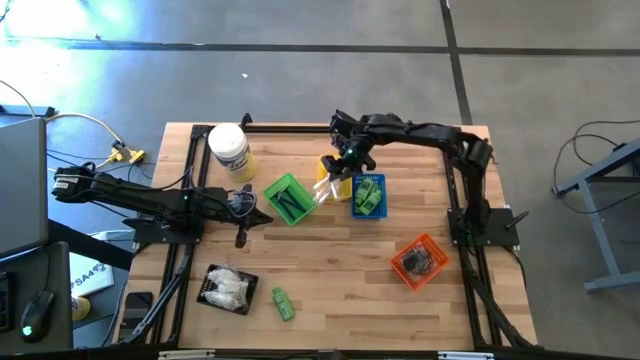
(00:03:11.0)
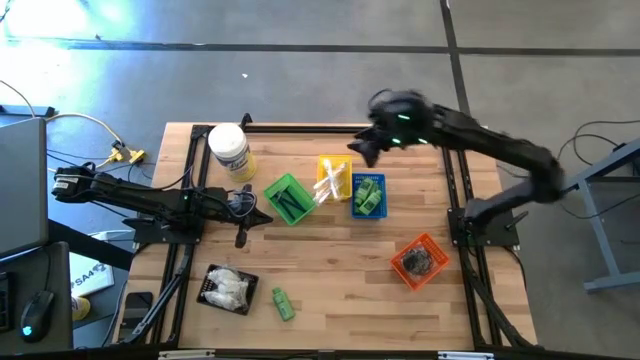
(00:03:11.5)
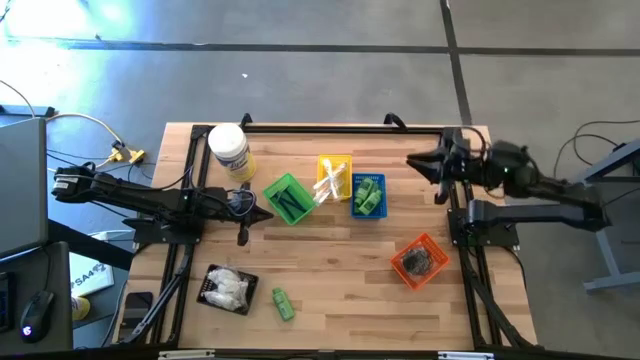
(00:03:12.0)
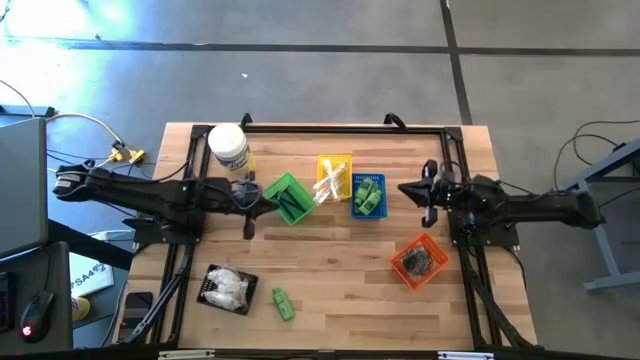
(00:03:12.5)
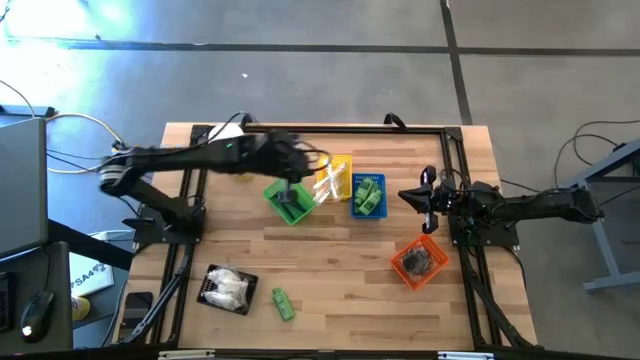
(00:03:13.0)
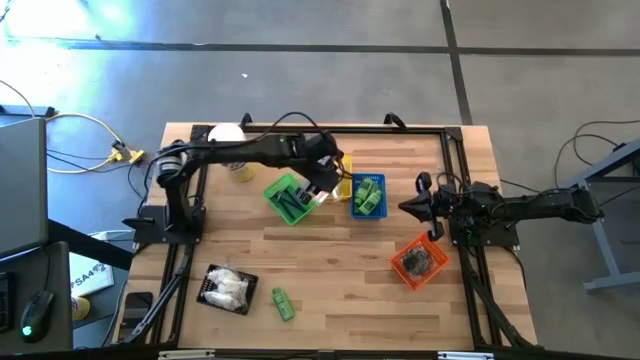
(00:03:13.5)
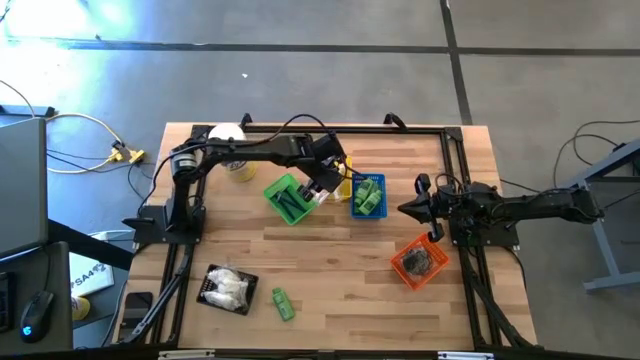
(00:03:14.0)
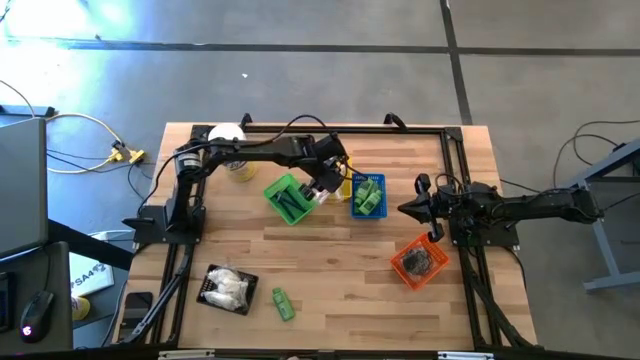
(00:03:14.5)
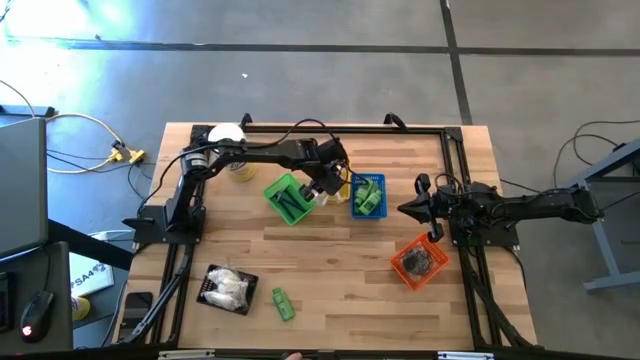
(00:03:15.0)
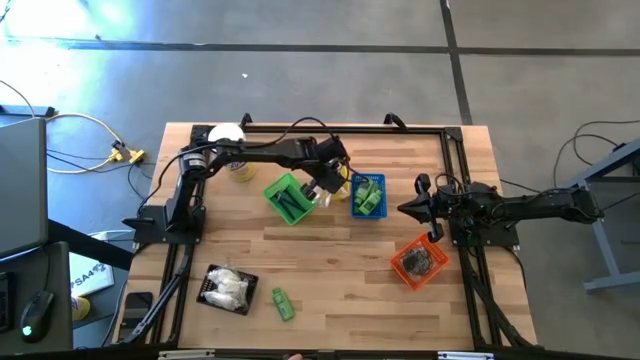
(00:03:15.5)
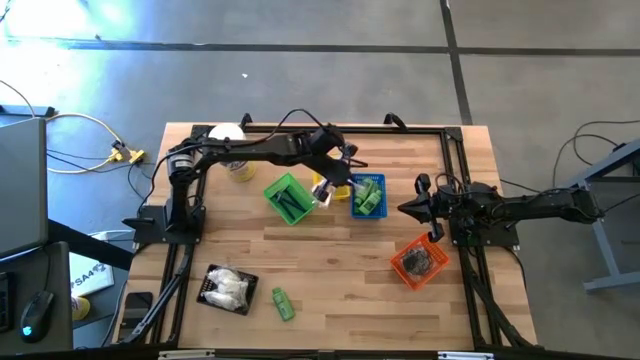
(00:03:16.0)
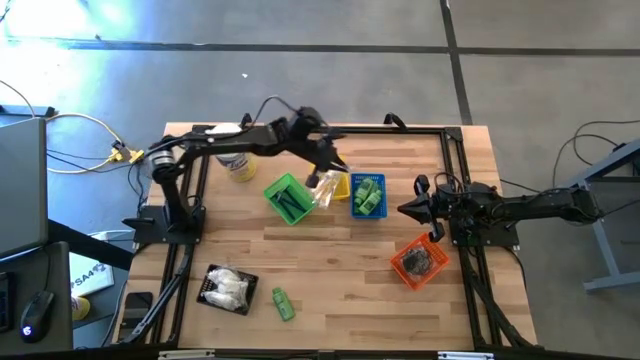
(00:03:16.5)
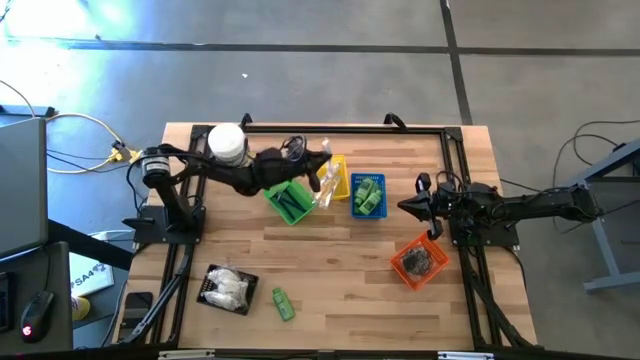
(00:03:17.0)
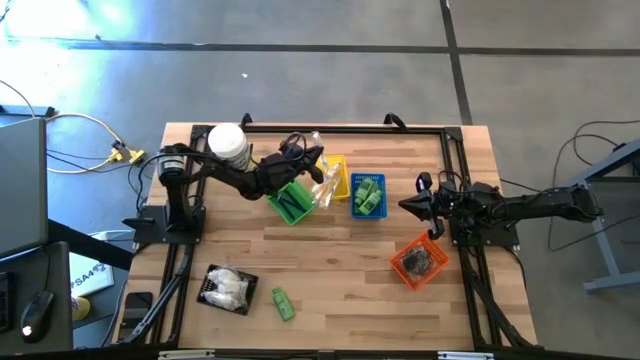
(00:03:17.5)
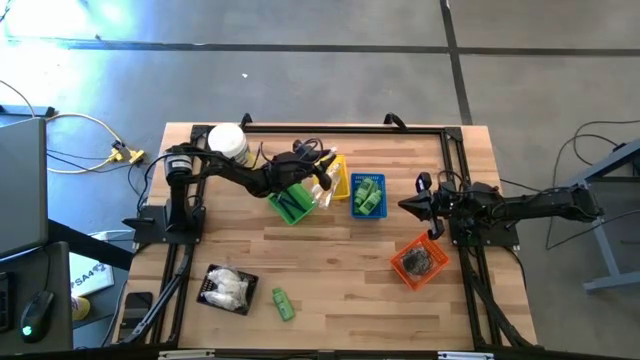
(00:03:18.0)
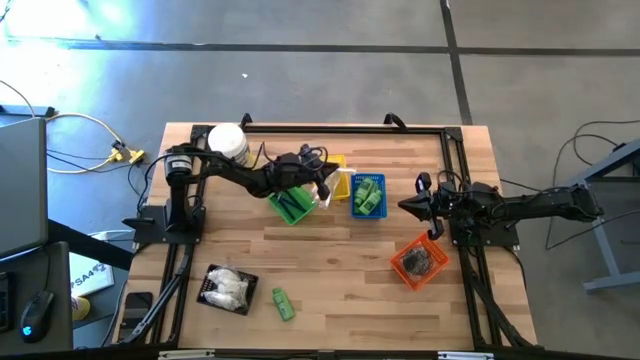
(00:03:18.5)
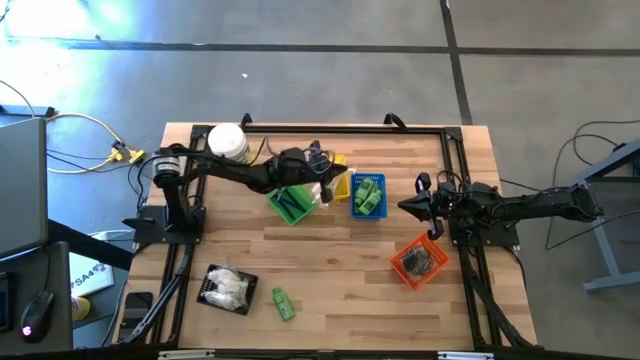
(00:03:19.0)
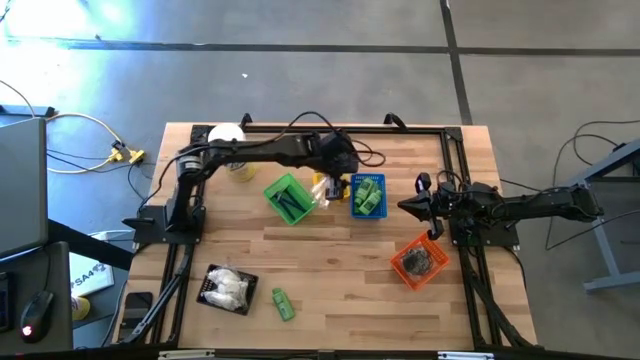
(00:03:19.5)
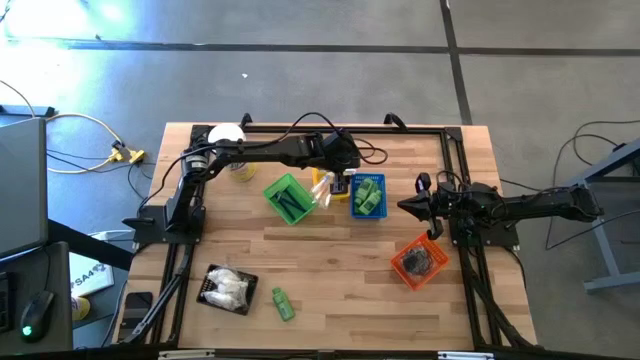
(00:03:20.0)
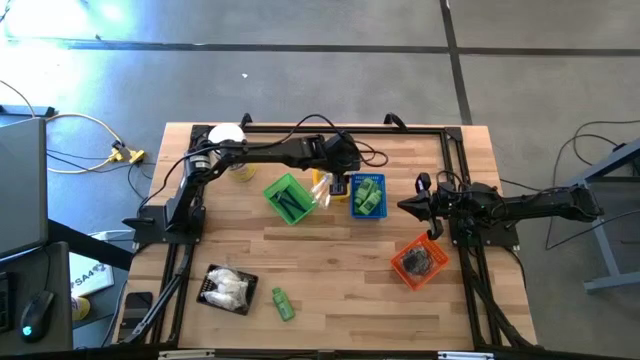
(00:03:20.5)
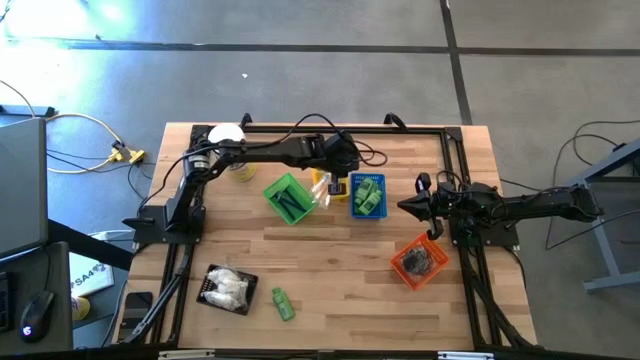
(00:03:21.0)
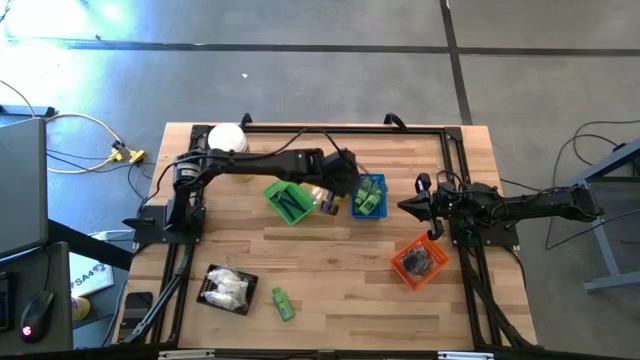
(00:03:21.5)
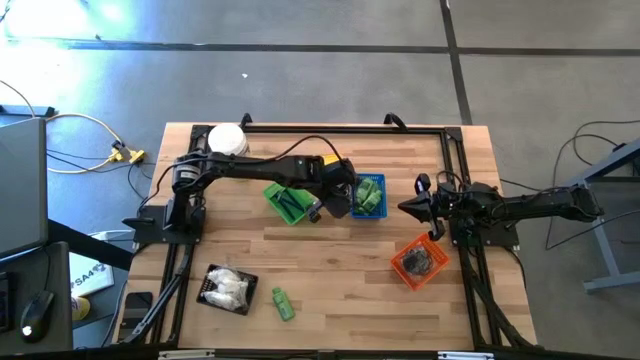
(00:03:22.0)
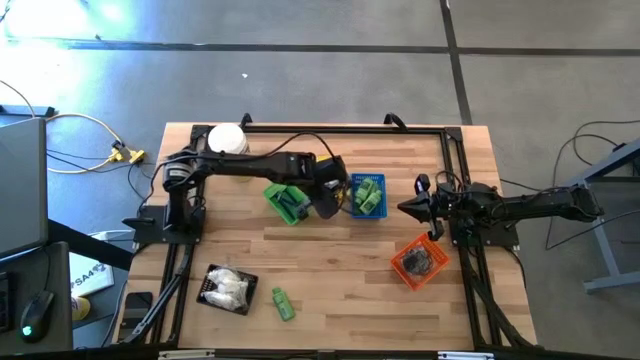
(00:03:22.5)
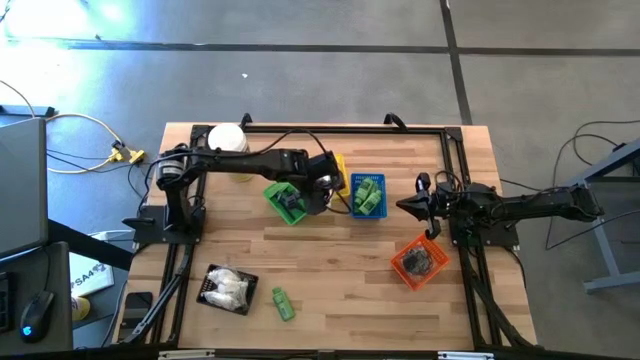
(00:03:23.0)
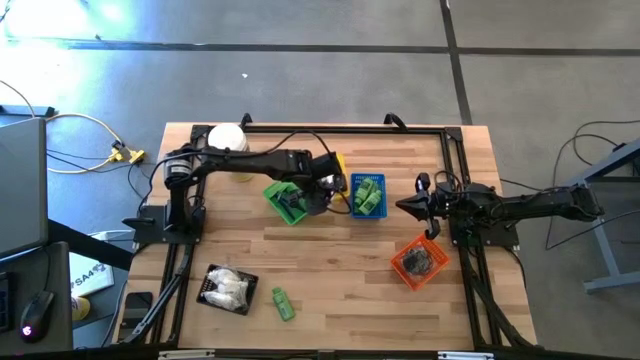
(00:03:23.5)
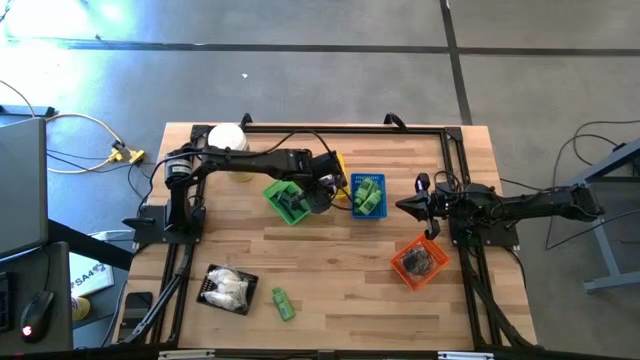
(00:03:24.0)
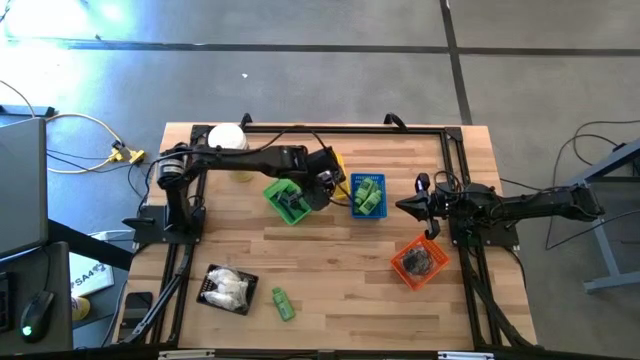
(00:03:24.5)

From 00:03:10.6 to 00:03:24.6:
Task: Pick & Place Travel size toiletries
Put the blue toothbrush into the yellow basket

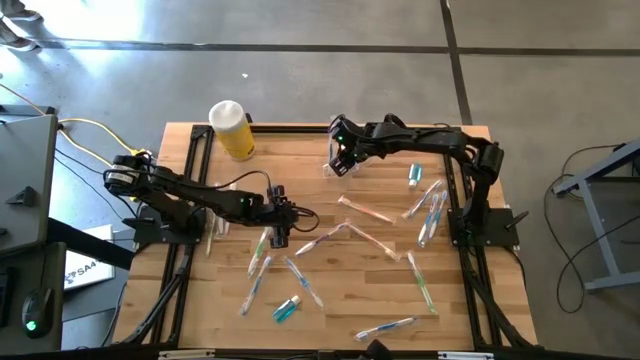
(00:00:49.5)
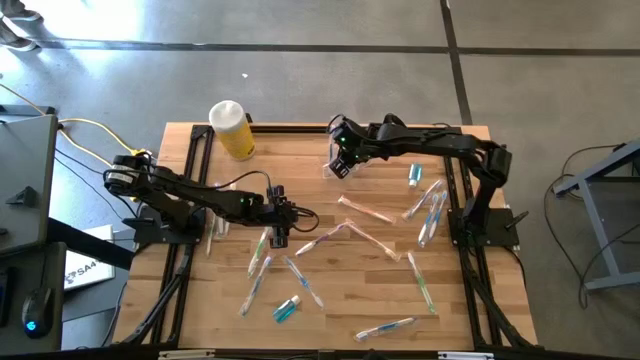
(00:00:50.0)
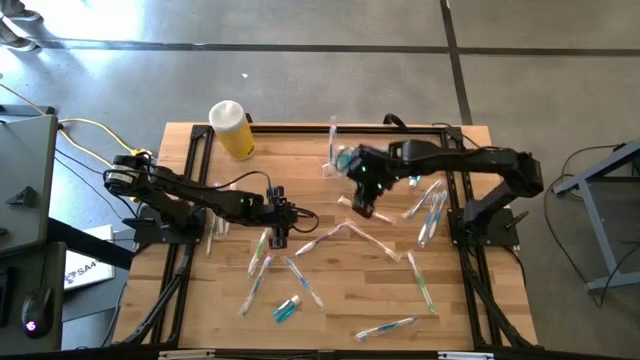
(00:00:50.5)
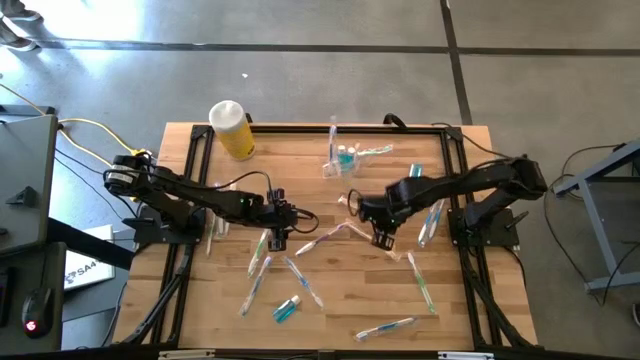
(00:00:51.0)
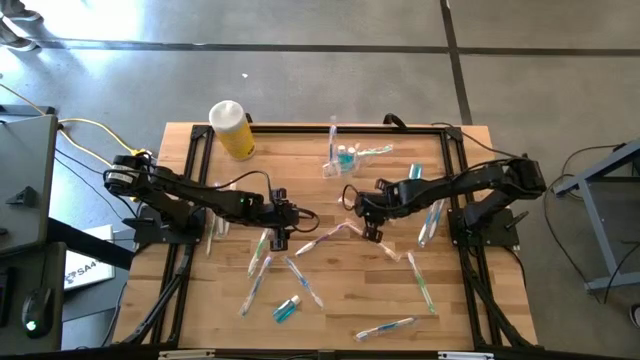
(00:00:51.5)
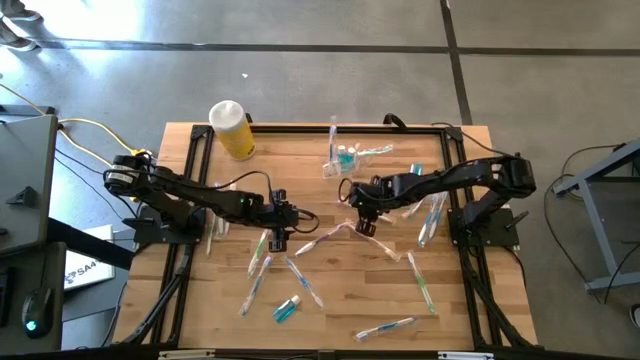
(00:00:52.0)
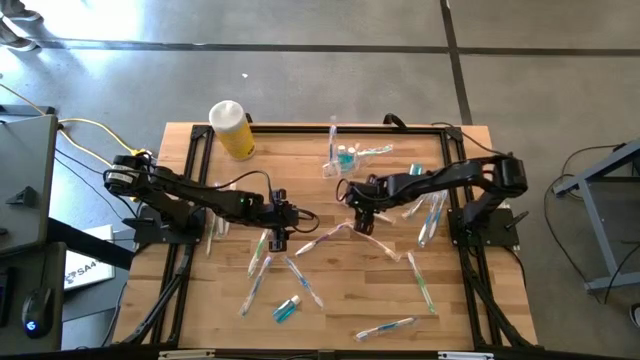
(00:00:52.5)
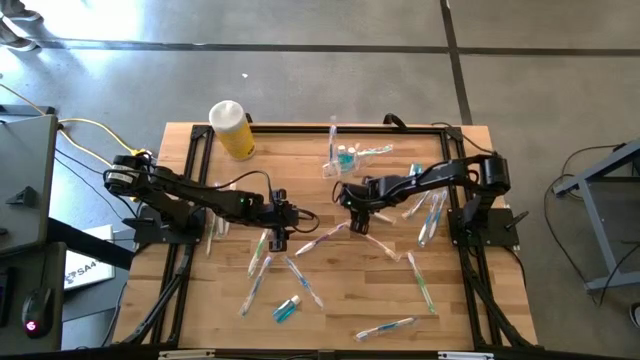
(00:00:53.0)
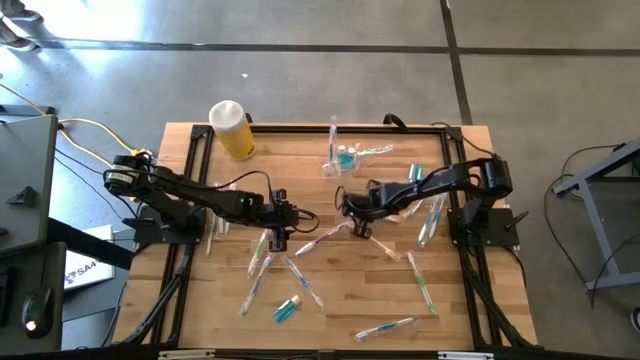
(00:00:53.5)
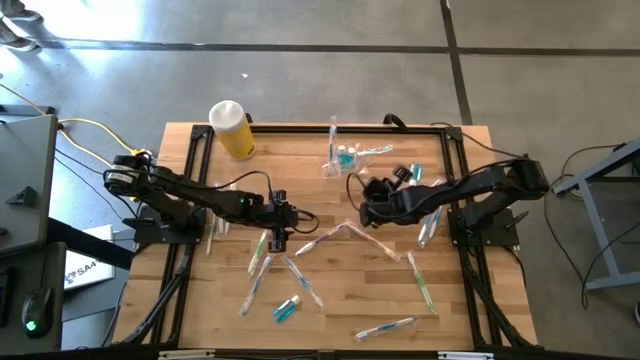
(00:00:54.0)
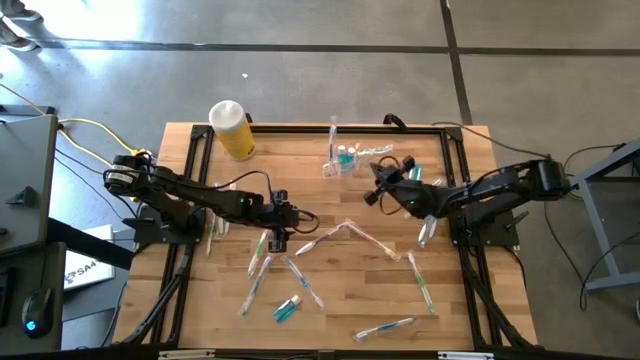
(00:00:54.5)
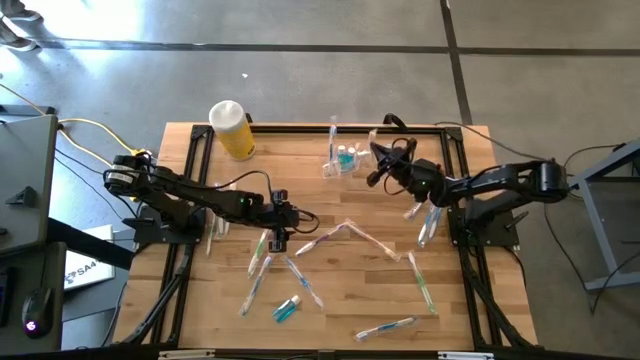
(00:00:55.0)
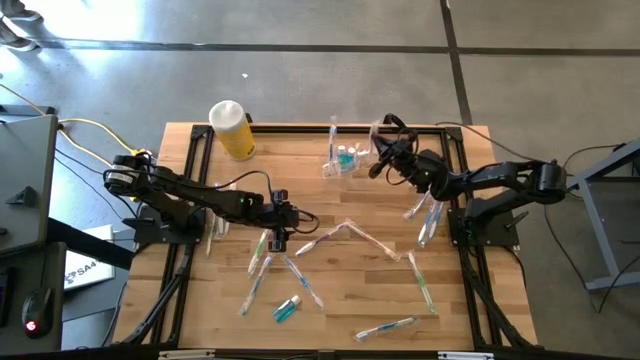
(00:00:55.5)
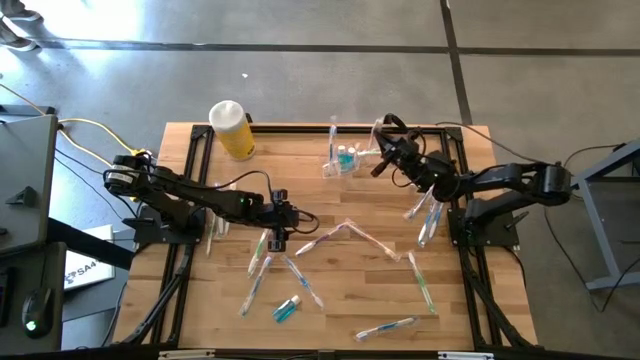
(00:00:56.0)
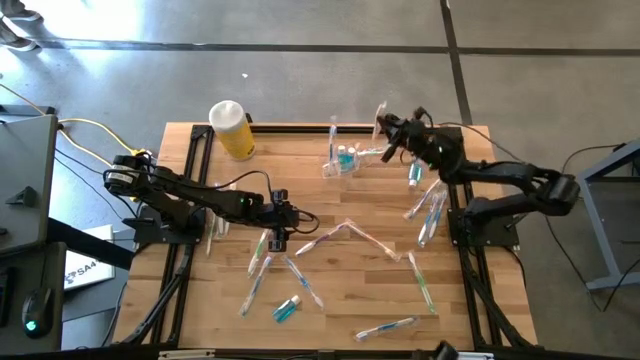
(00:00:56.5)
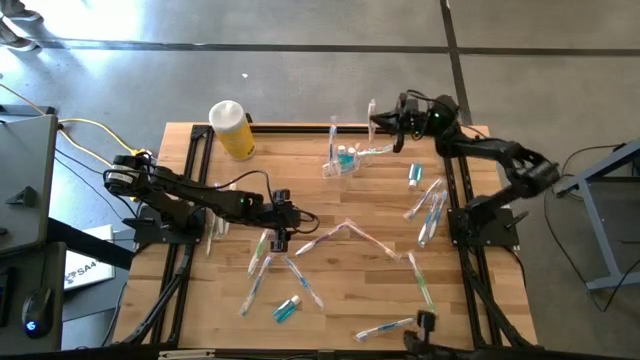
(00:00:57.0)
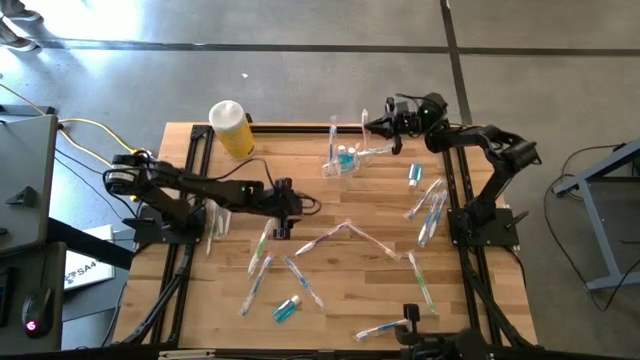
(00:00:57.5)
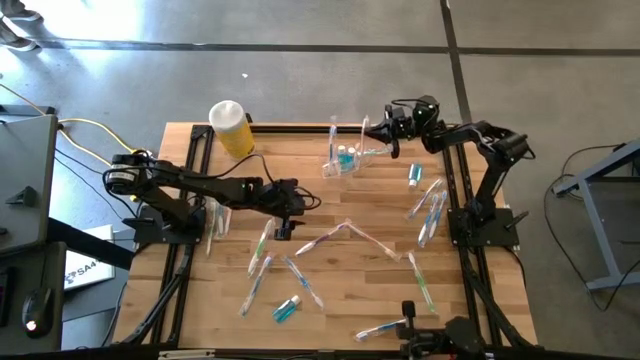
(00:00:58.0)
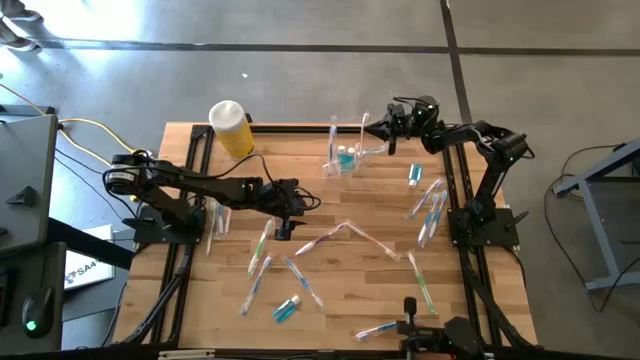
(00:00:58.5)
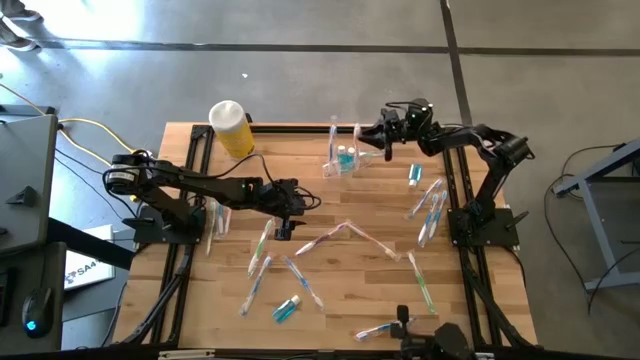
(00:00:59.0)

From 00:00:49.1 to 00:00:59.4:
Task: Pick & Place toothbrushing station
Put the orange toothbrush into the transparent organizer
